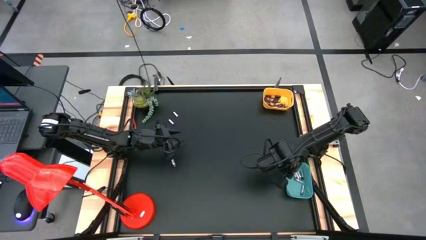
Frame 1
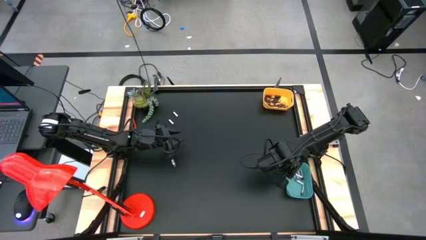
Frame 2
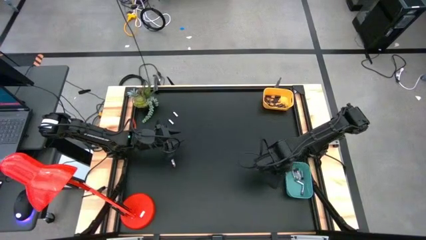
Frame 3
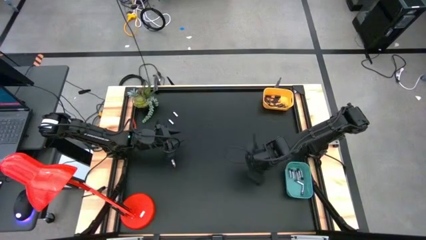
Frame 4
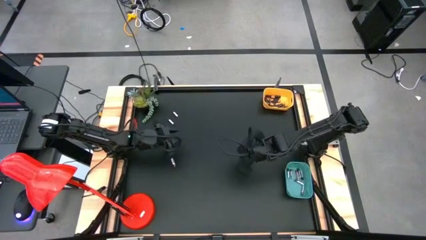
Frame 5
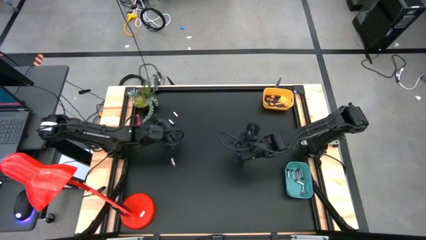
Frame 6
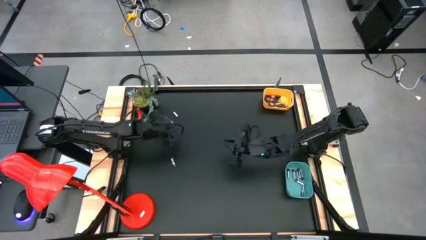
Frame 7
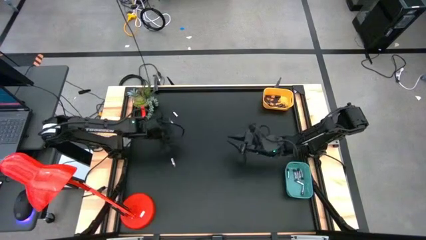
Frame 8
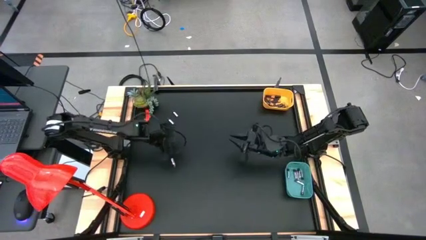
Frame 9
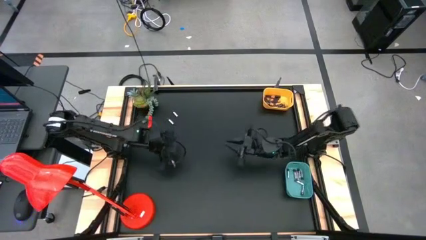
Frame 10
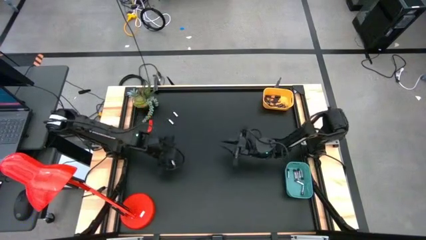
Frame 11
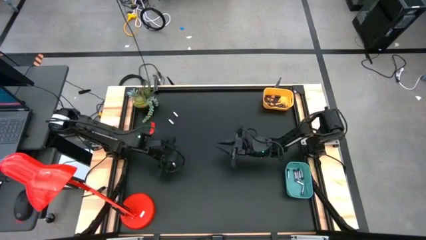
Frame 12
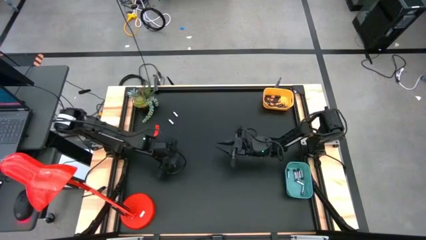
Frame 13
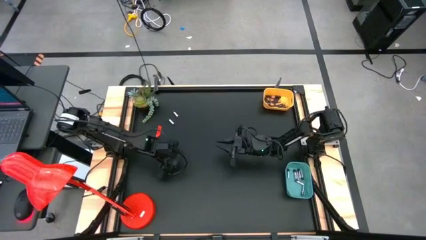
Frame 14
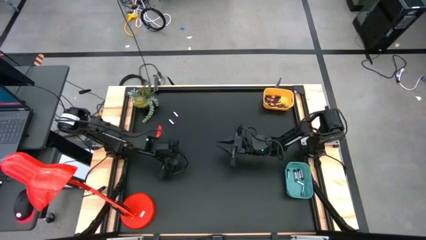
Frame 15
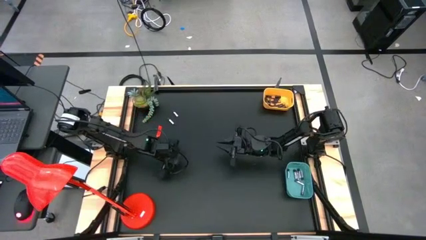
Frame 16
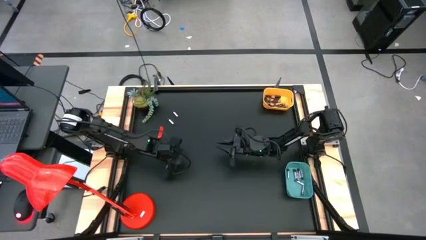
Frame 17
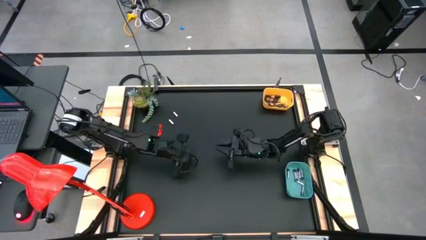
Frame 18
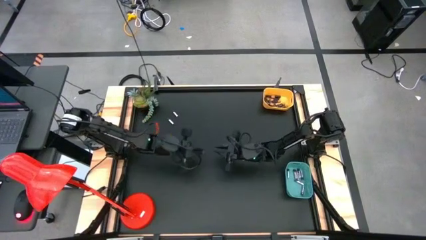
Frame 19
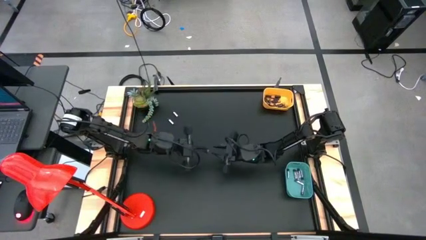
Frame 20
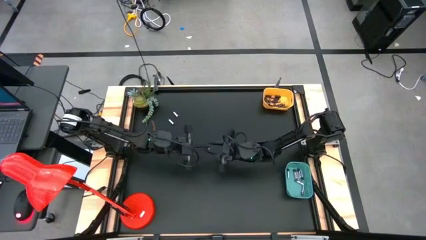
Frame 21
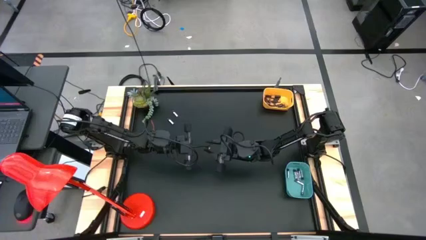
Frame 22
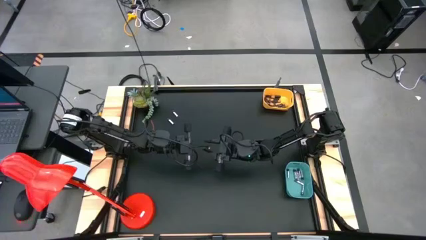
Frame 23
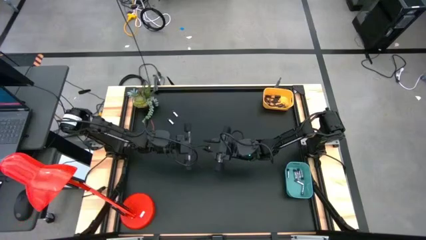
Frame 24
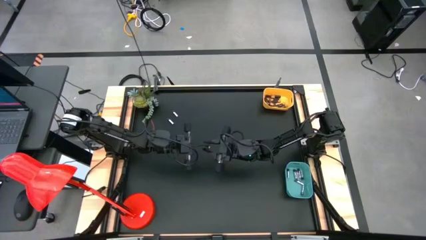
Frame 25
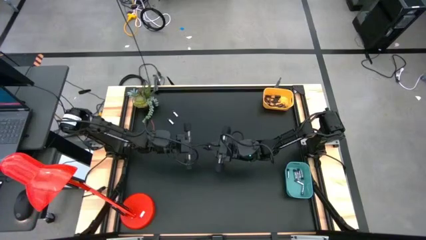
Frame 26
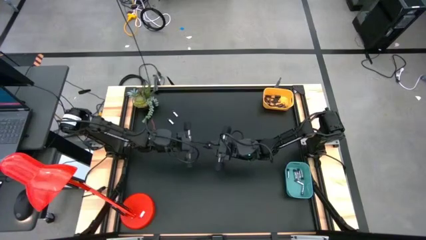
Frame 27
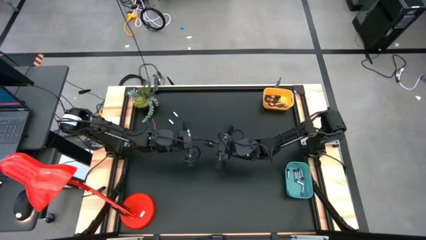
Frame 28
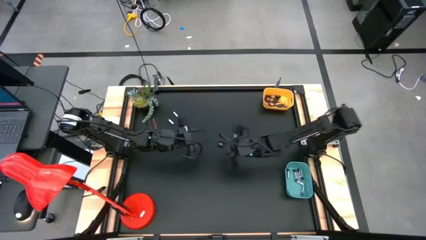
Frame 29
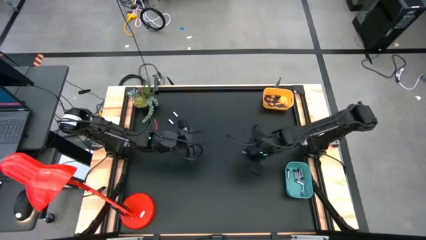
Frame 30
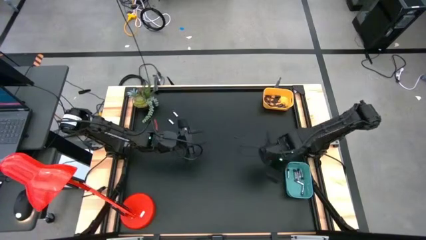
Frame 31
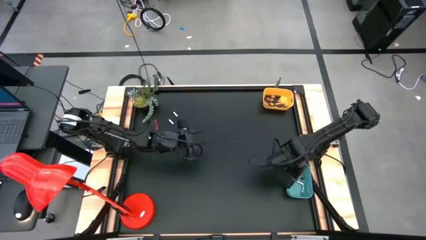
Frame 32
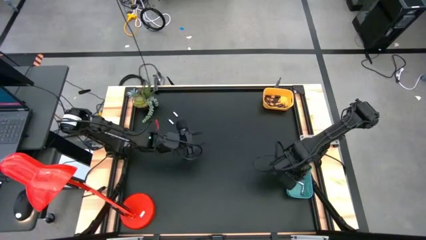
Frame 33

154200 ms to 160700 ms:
Task: Sort batteries
Put the silver battery into the green bin

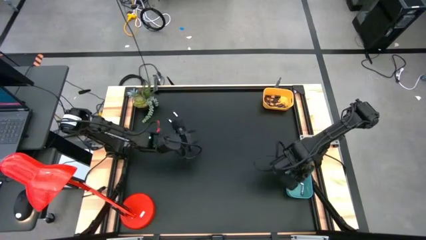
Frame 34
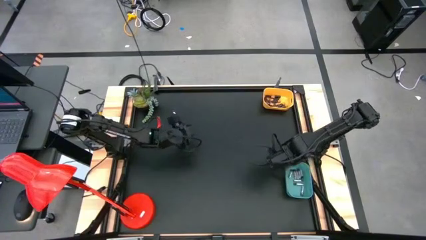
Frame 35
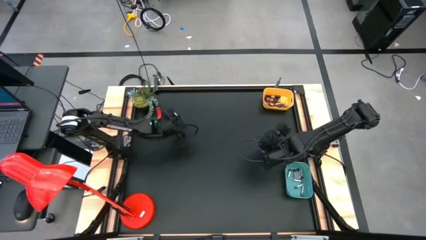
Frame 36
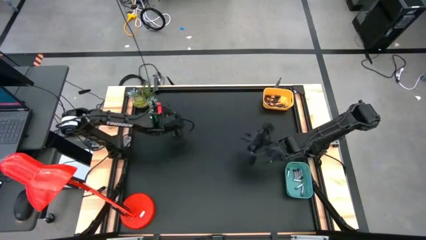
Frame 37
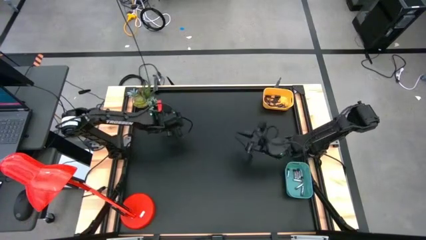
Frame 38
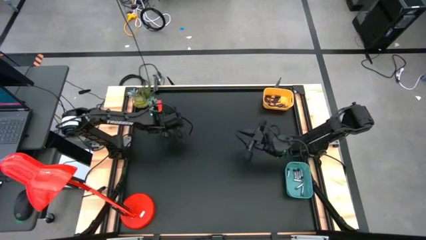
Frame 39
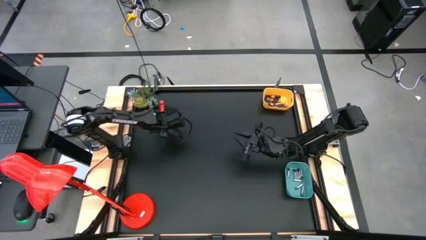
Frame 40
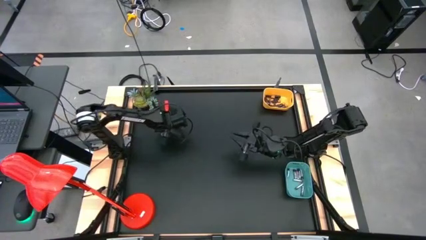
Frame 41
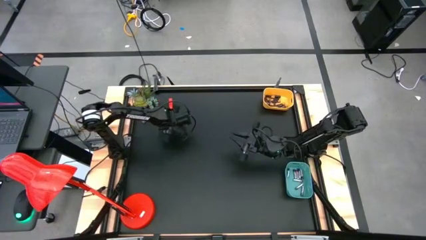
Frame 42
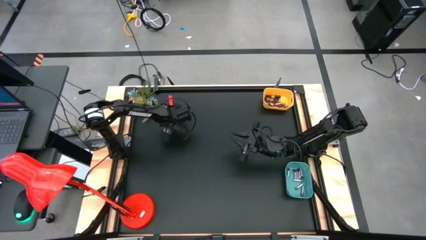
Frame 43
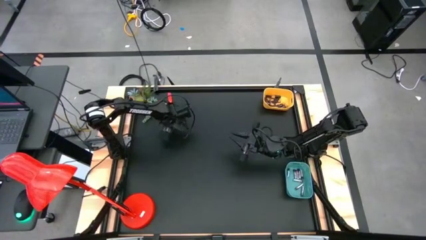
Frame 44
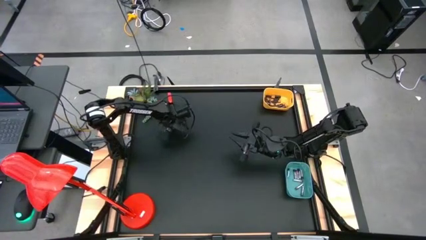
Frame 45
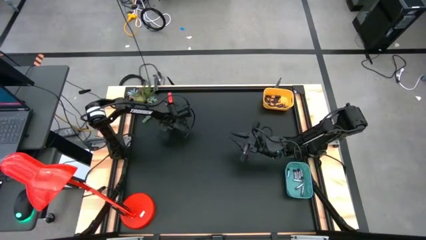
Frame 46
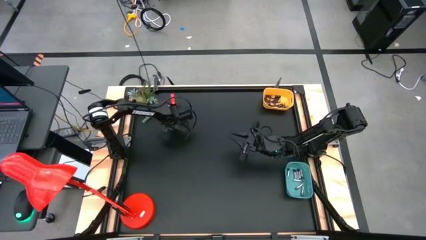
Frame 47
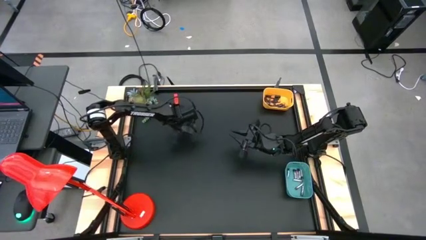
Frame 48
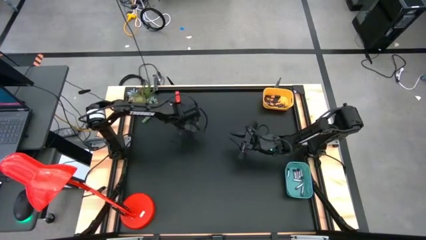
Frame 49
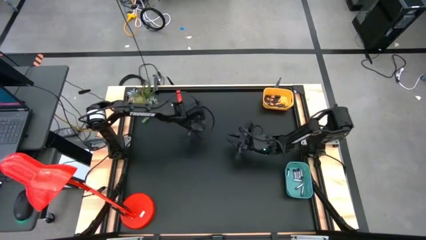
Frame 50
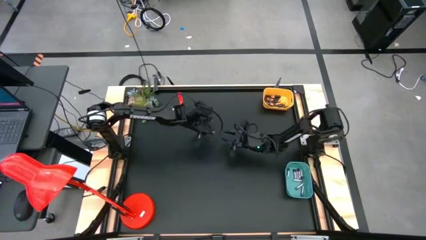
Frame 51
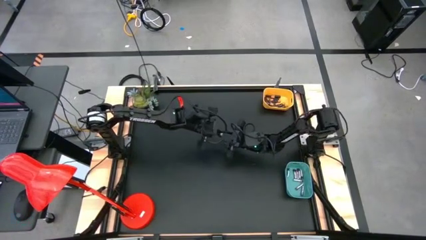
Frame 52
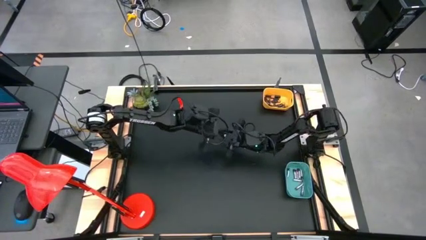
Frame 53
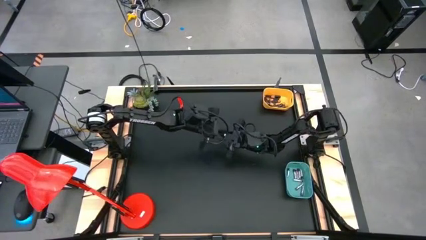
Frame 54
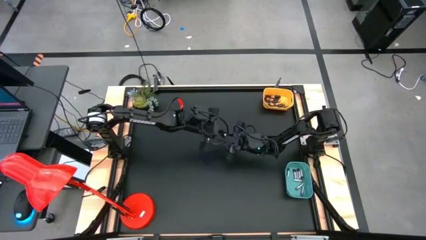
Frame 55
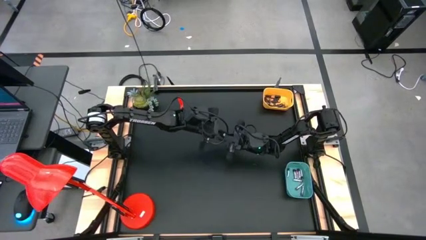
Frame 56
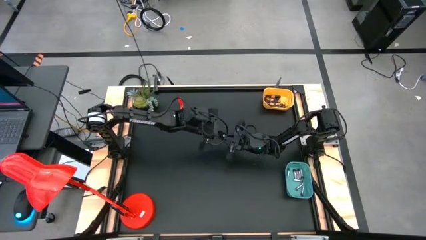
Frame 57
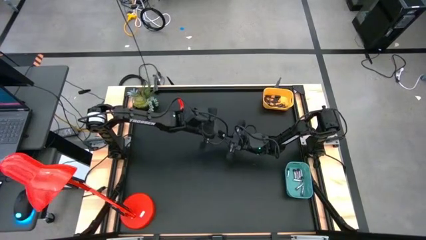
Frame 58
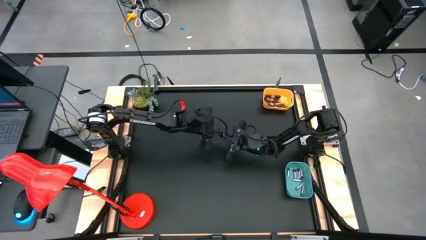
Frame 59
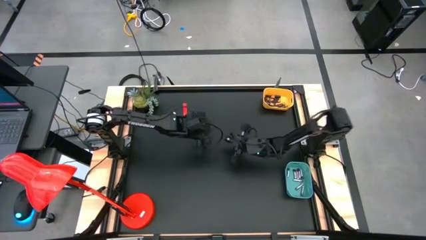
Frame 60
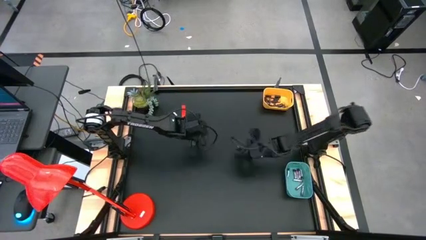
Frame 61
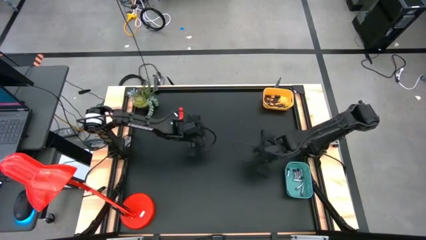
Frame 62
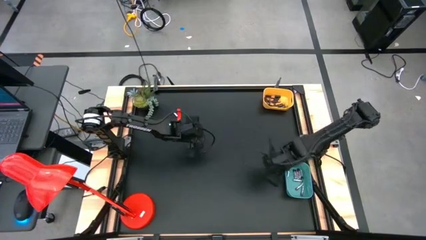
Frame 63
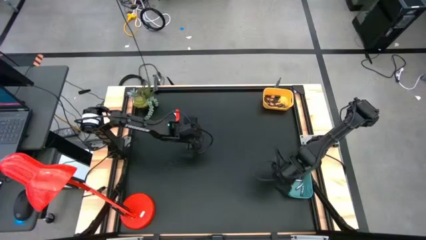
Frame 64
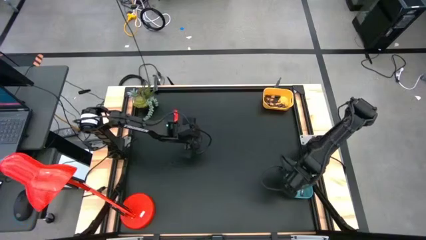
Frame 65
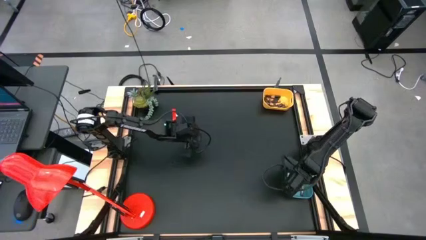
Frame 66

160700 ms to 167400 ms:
Put the silver battery into the green bin

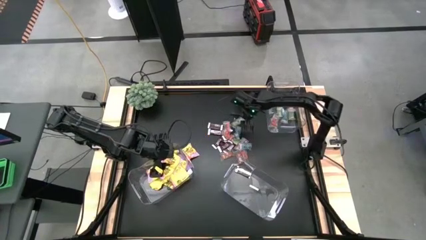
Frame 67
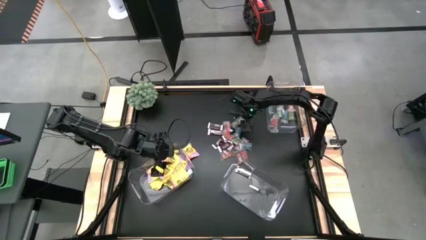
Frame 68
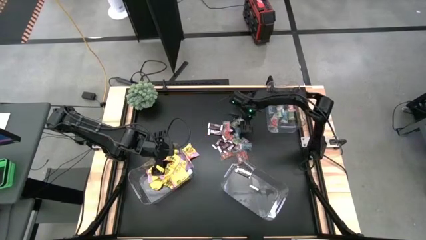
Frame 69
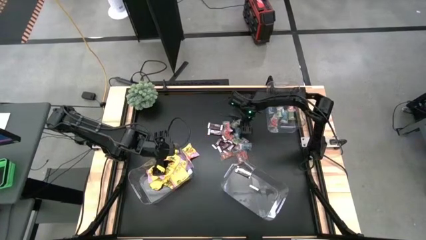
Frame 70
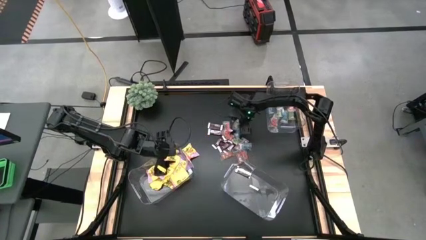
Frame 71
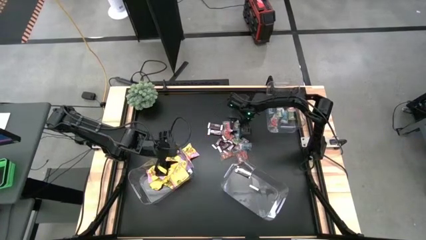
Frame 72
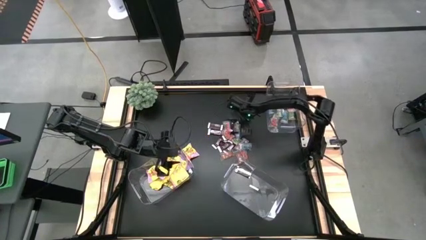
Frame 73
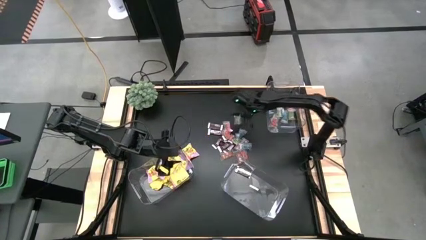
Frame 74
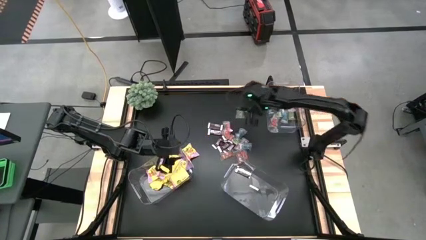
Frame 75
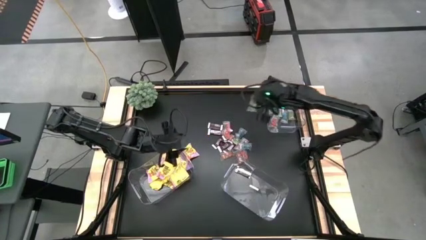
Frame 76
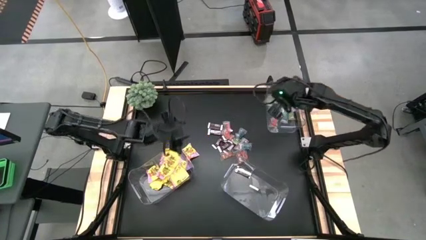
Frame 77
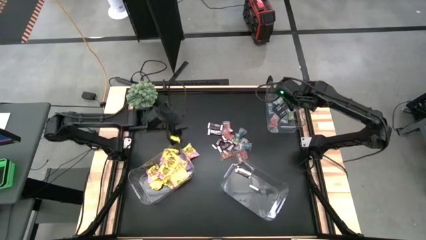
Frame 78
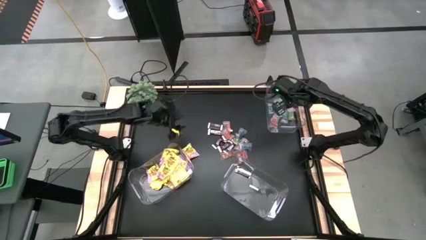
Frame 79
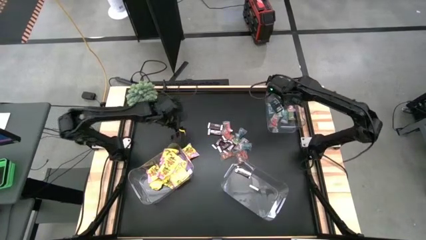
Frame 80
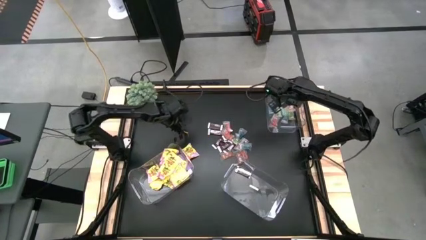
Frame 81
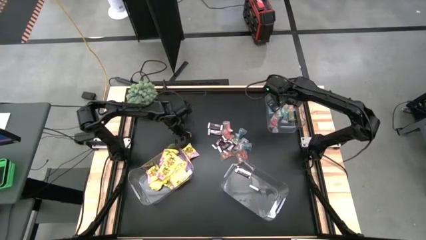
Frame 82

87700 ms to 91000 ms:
Task: Sort candy
Put the green candy in the top right transparent container
